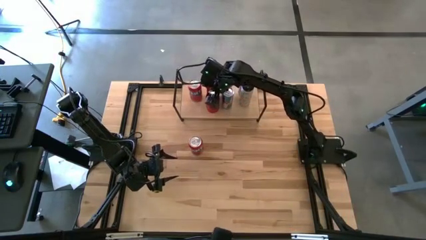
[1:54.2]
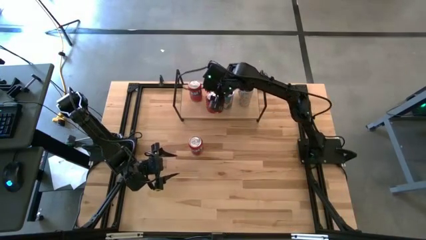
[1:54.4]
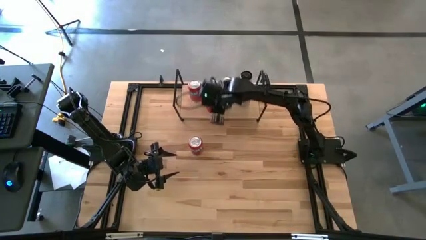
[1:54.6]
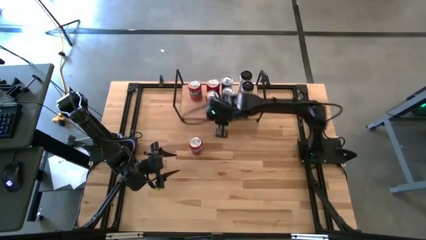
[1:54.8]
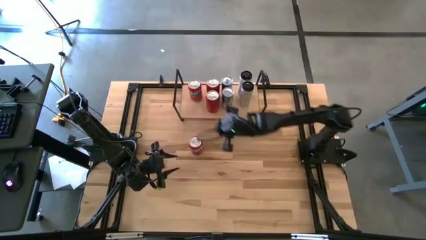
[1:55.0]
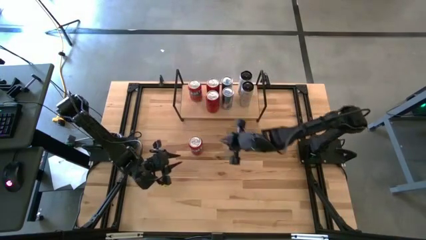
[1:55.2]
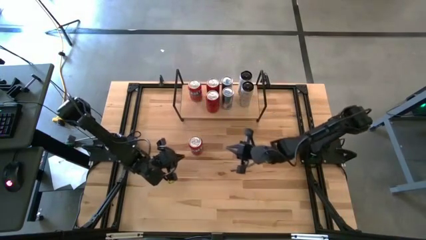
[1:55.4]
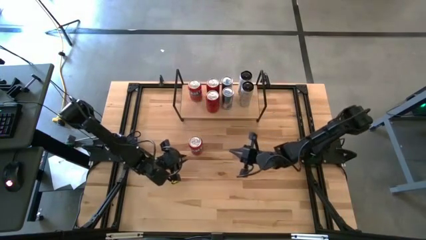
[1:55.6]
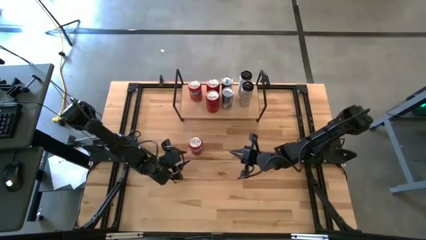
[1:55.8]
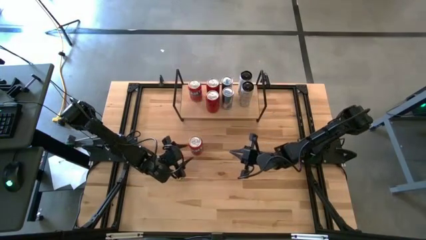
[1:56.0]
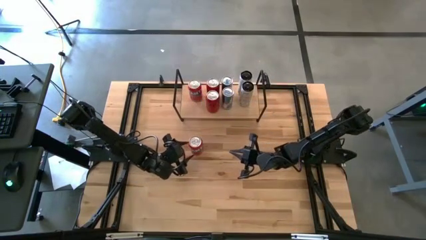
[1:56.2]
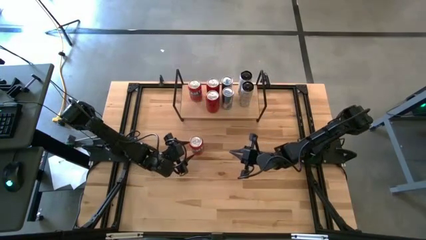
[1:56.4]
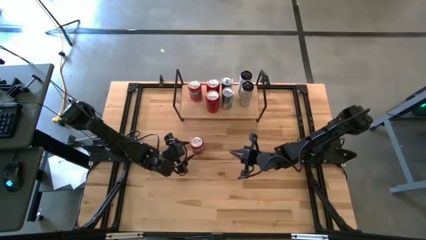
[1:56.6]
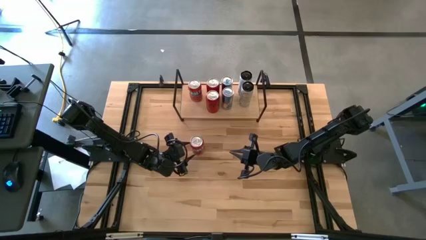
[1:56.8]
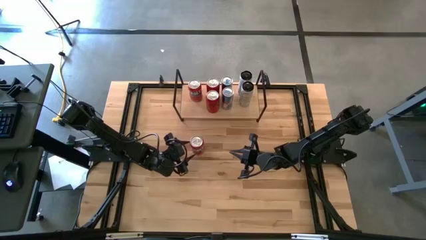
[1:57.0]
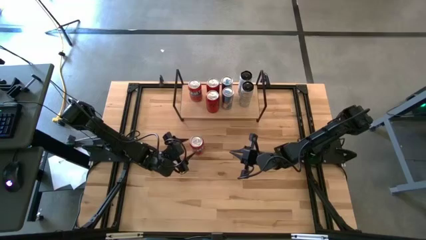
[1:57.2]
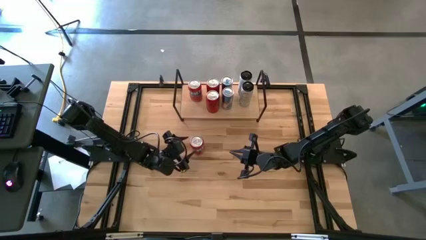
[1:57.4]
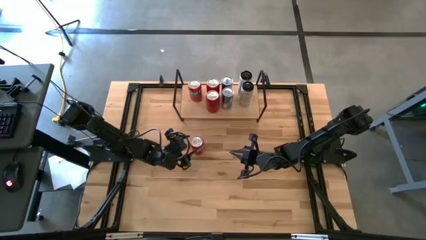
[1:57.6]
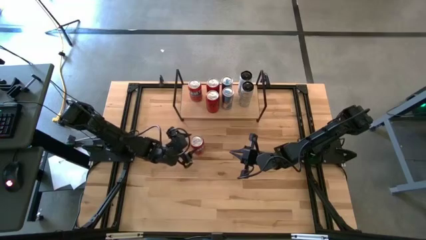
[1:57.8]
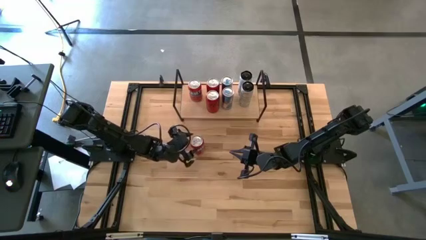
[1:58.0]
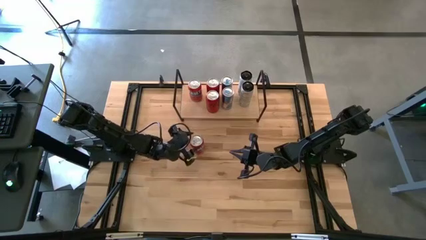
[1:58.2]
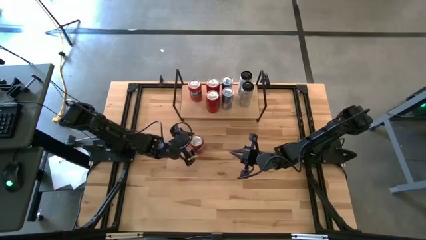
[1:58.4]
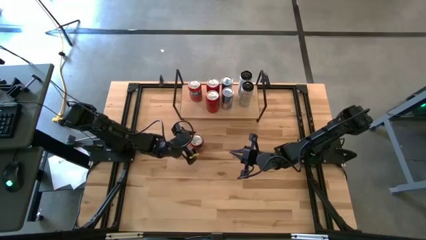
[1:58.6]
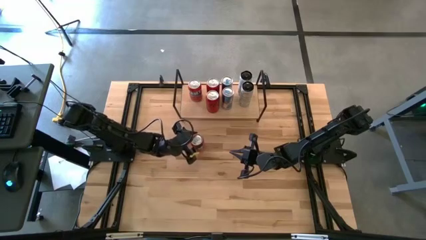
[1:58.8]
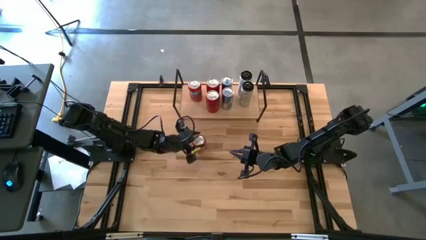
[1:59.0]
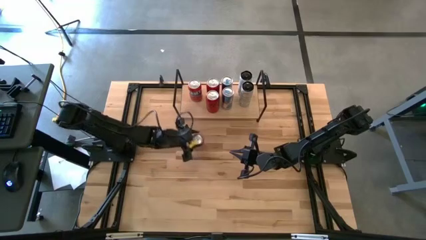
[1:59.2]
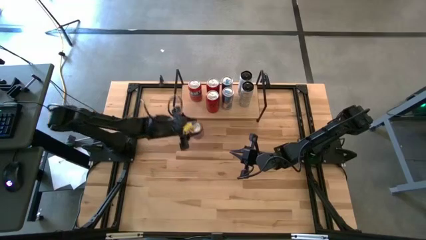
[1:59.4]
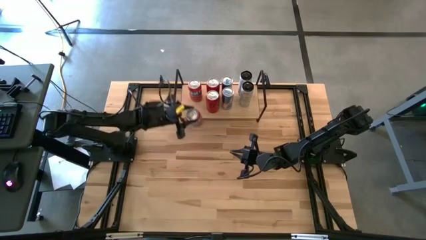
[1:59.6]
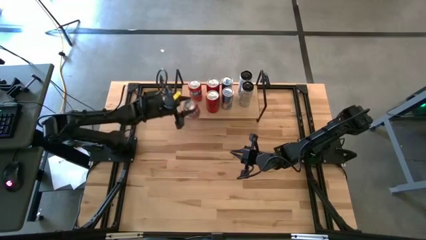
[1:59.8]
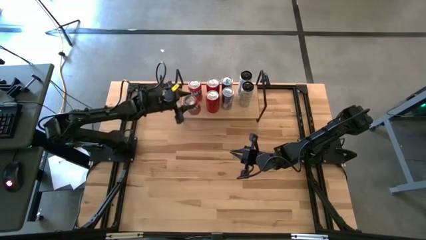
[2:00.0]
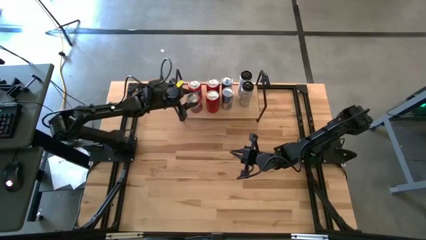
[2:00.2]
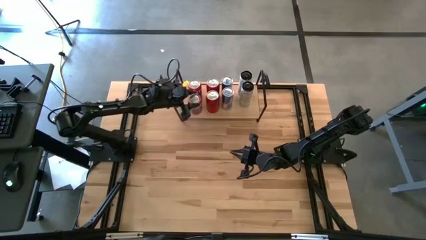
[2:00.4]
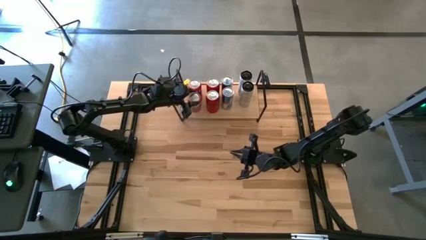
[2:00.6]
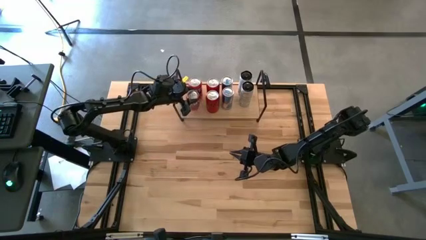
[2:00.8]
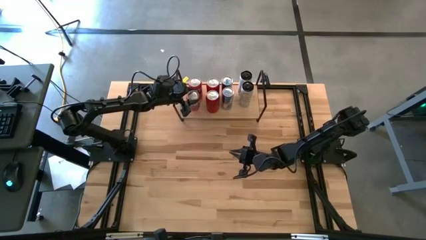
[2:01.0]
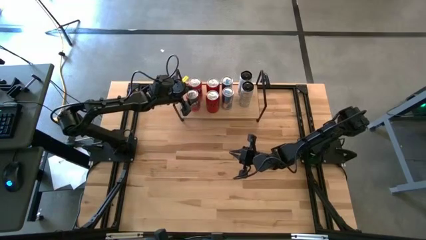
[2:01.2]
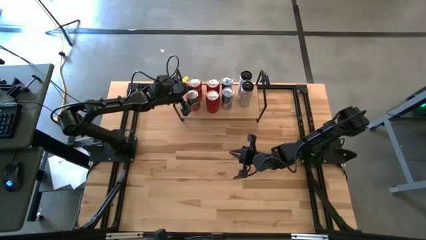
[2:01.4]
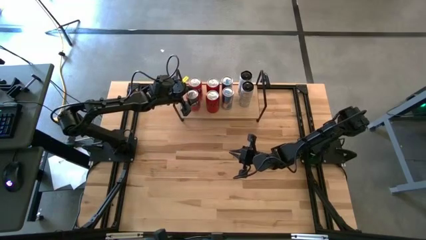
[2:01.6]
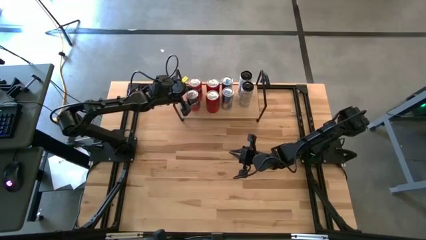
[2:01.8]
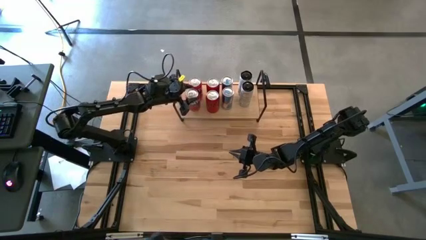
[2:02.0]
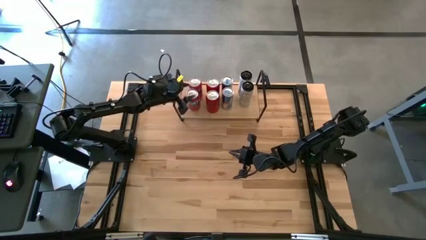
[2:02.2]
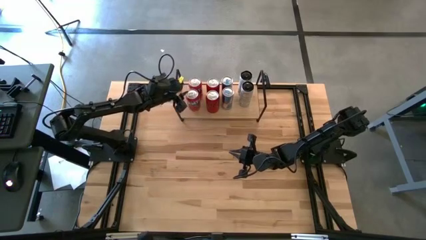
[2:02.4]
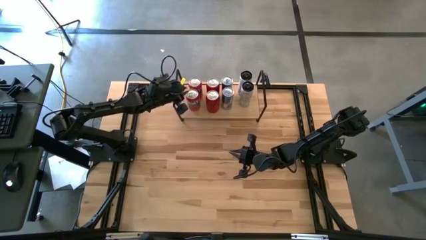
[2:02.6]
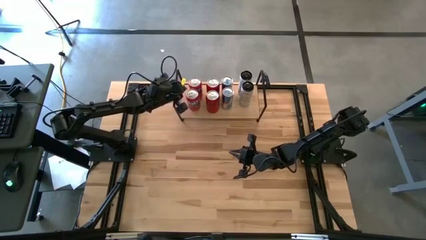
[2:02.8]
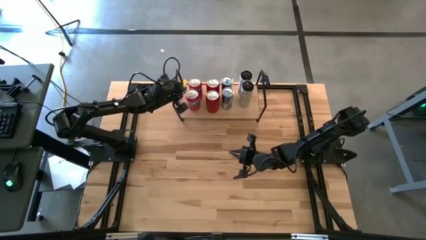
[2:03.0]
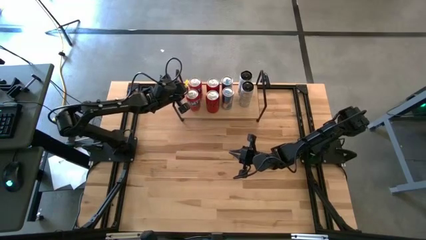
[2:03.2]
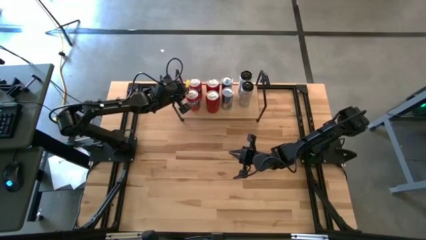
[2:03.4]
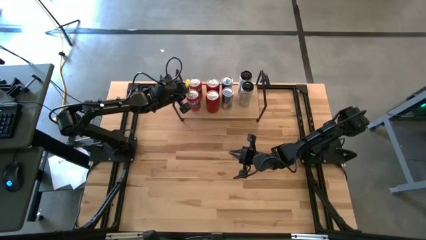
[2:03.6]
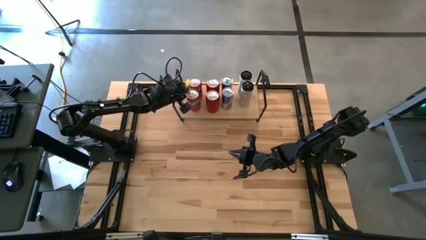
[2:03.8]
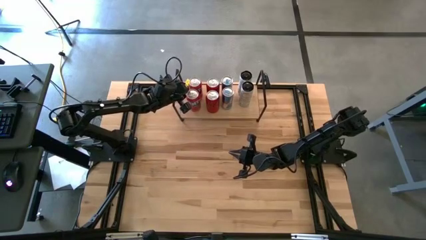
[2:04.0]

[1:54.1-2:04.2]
Task: Place canned beverage on shelf
Put the red soda can on the shelf and align with the other red soda can

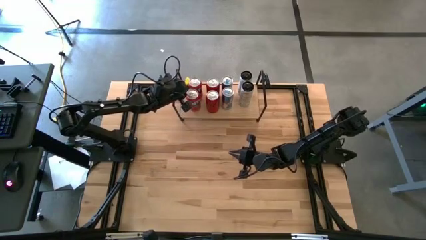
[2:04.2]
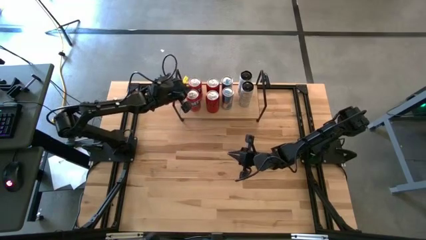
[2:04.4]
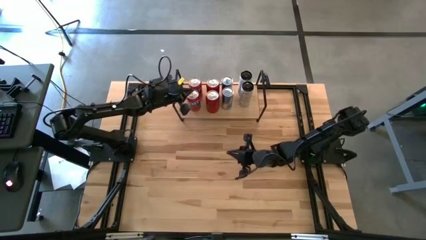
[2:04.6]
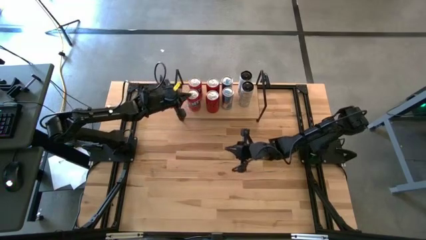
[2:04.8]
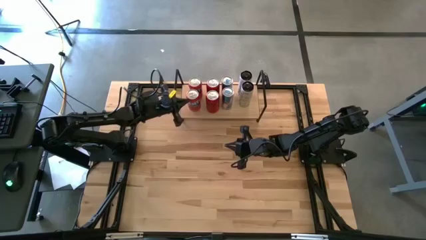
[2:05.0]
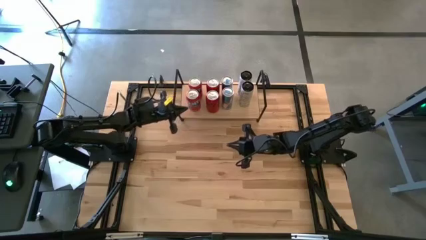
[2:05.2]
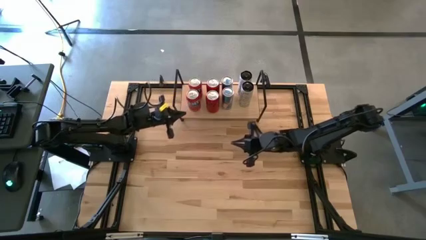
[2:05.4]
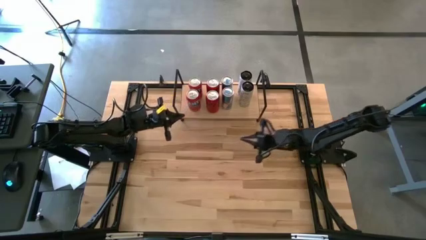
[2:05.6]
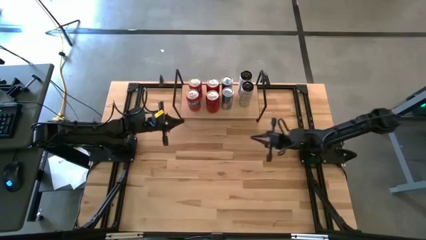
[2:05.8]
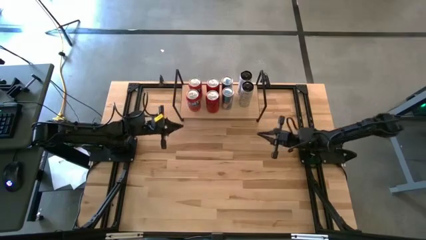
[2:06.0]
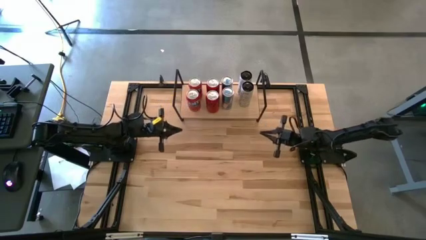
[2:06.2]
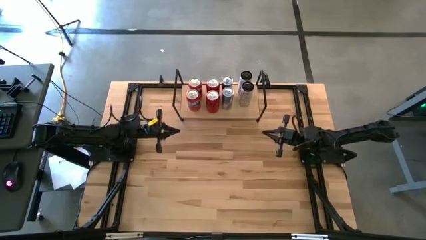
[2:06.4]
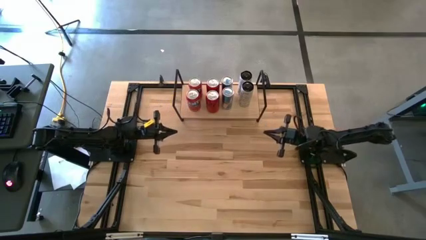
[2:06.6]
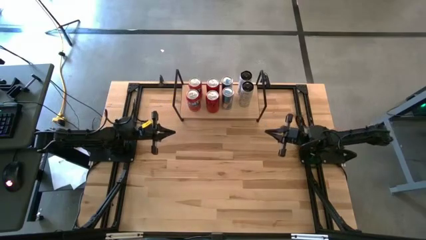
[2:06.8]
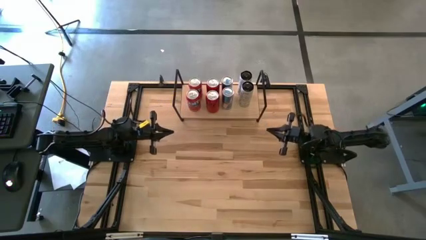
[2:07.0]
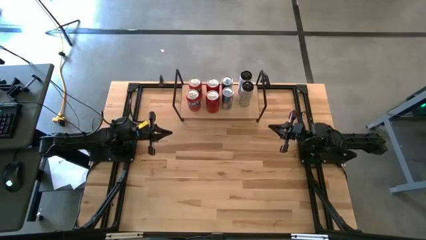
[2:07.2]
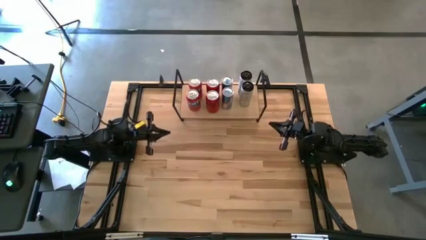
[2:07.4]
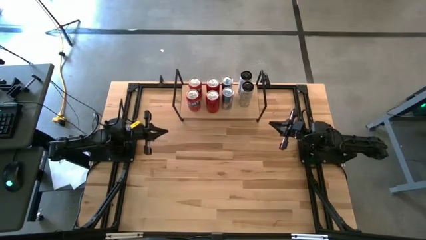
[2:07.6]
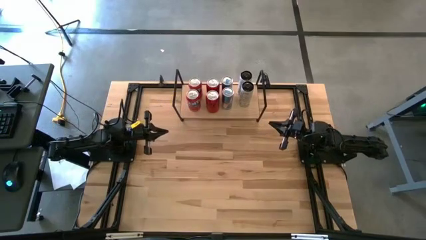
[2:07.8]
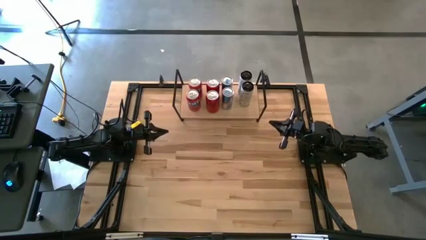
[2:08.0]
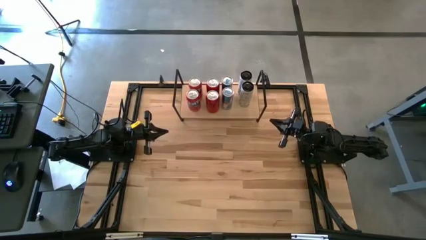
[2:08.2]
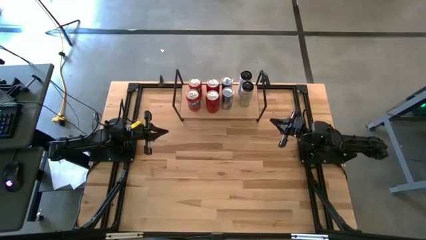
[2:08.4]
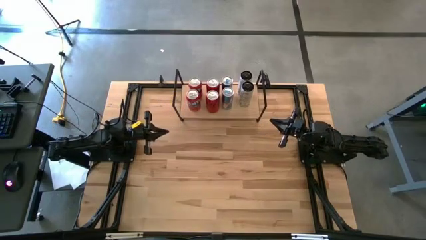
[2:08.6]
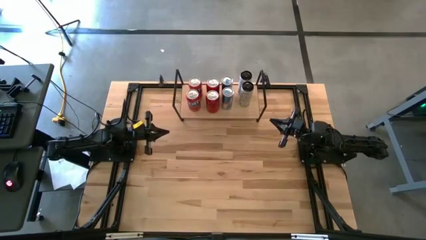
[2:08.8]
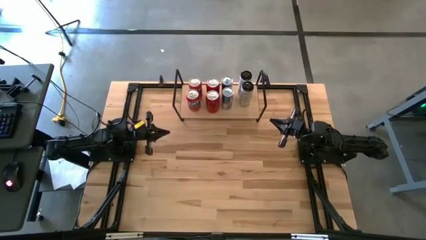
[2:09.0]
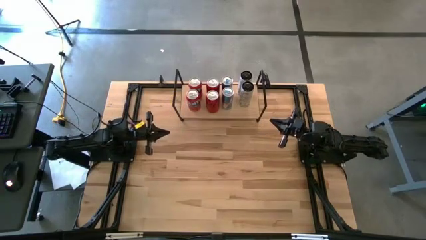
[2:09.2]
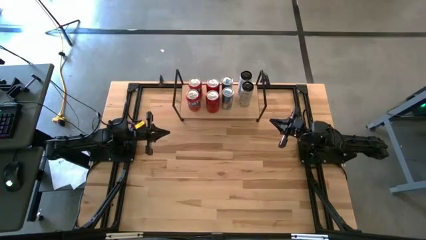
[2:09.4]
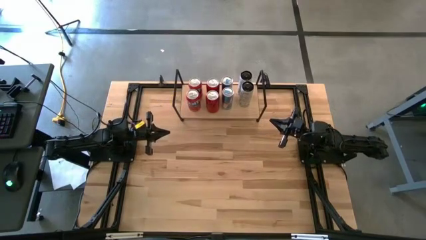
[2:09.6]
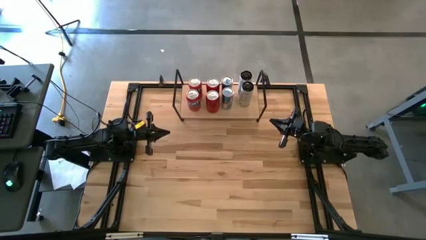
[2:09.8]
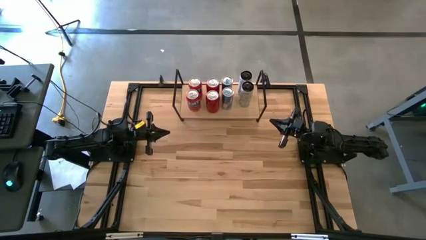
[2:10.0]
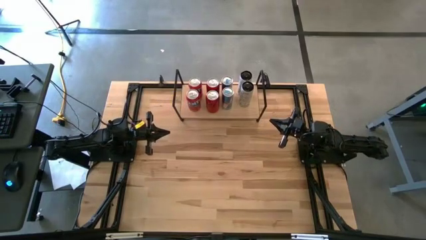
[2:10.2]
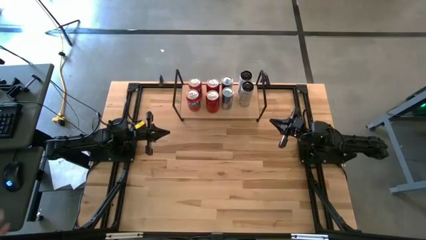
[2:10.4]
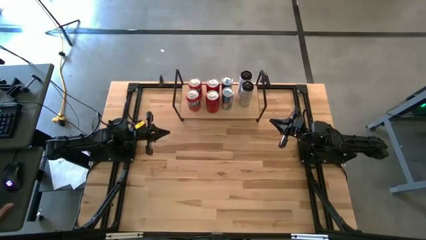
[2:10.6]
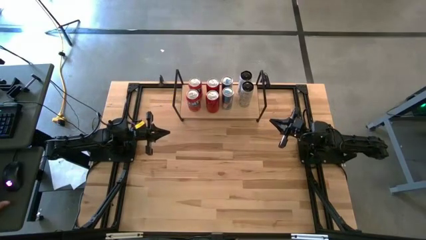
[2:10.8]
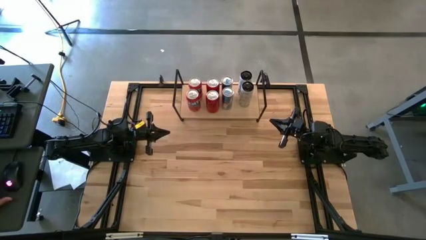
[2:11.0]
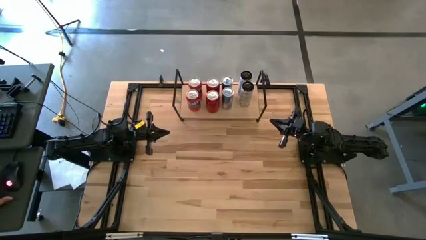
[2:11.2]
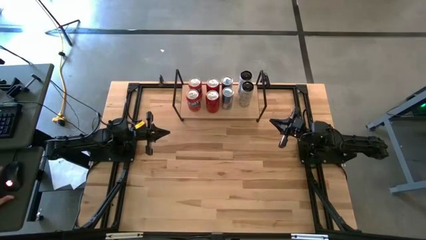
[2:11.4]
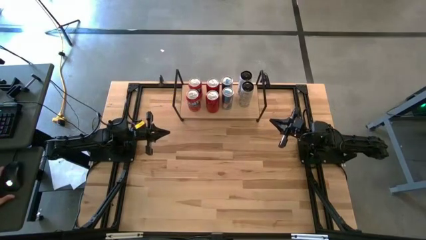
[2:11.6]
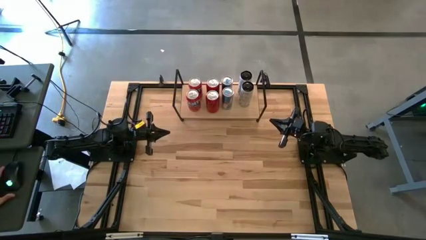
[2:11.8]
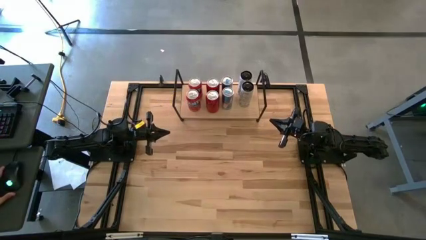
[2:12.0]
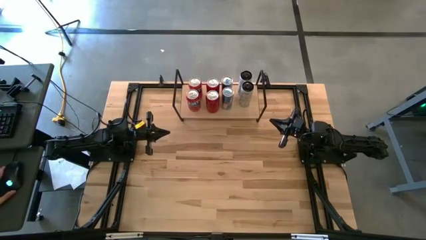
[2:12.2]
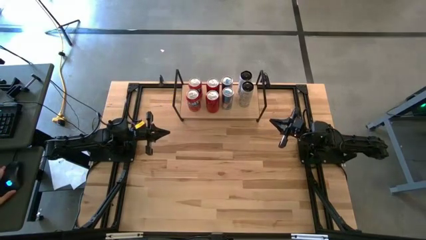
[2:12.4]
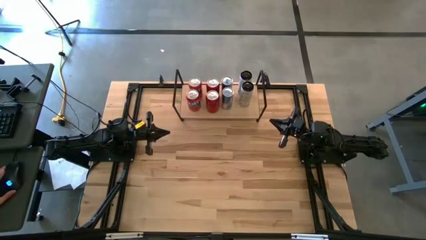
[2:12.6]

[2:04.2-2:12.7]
Return to Home Position
